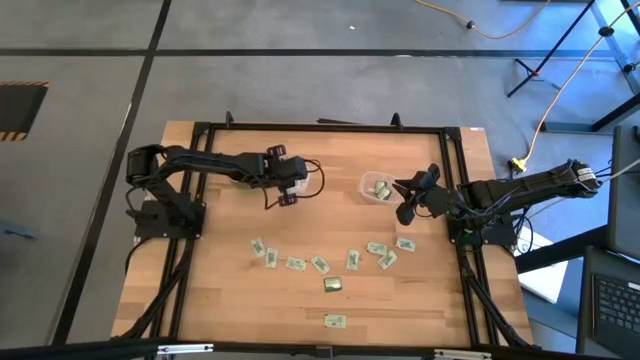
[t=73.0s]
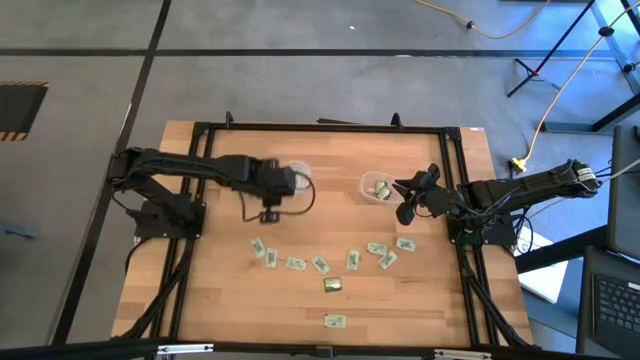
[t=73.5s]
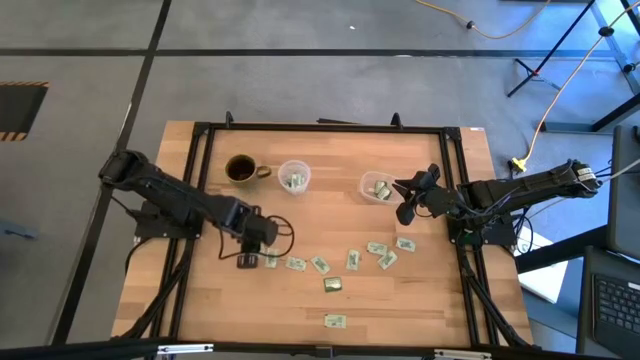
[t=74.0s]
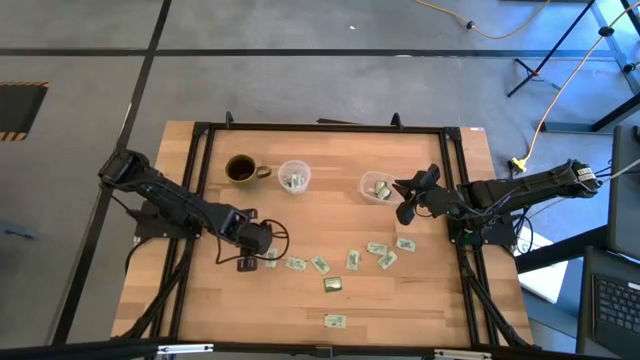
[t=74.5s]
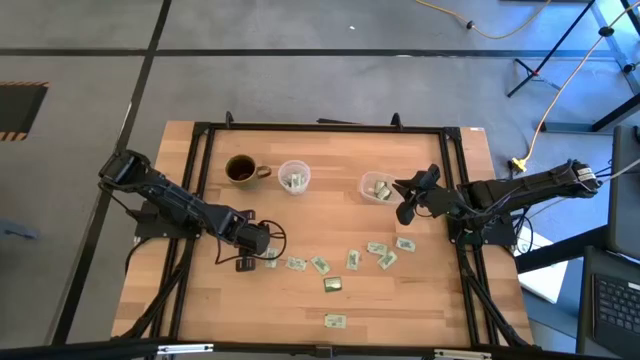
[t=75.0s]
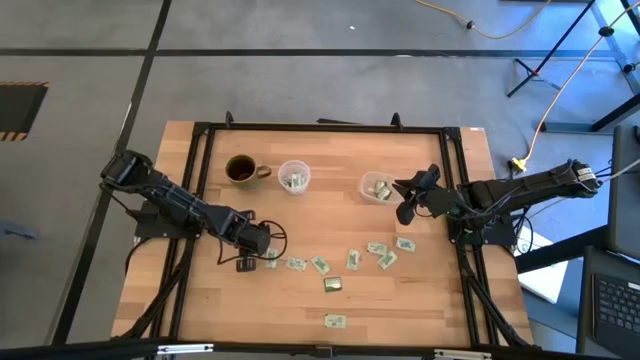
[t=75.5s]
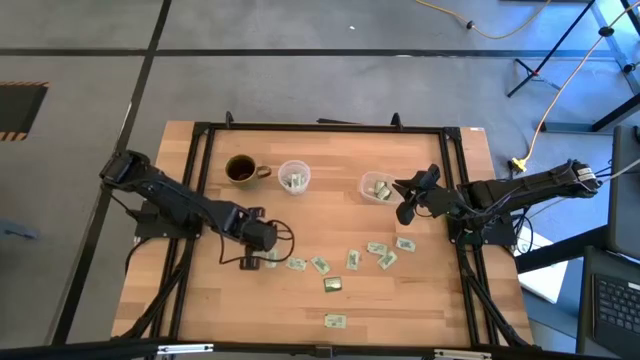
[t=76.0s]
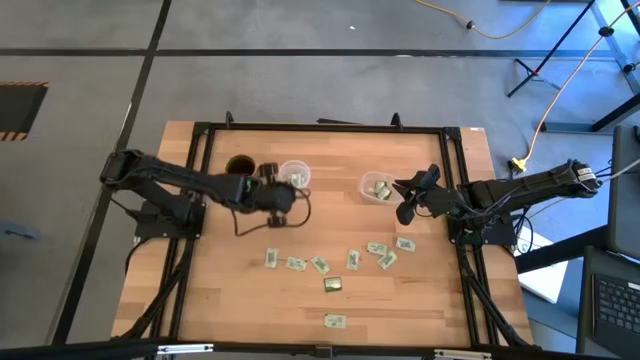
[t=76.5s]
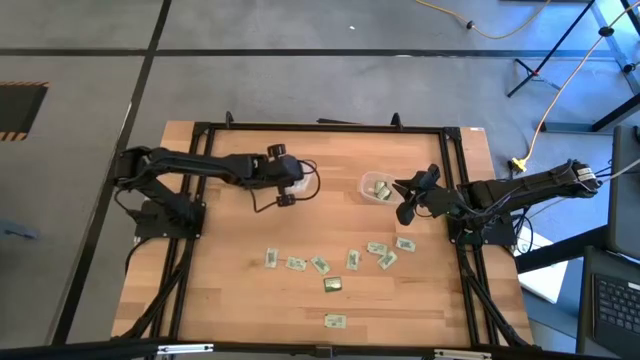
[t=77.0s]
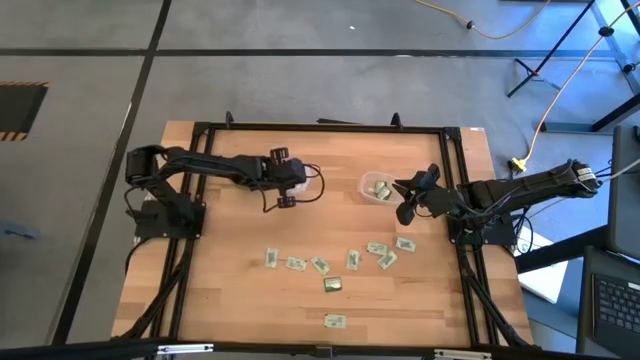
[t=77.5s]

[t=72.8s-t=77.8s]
Task: Pick and place items into bin
Put the white stevia packet into the left transparent bin

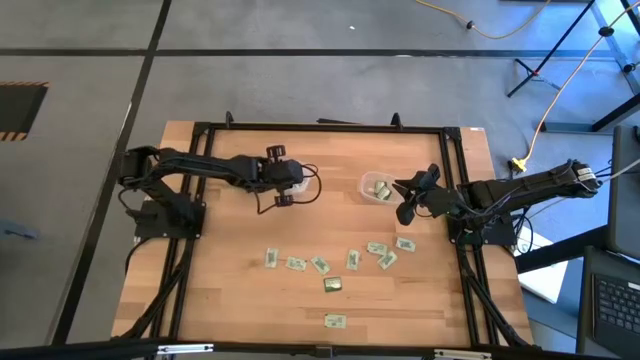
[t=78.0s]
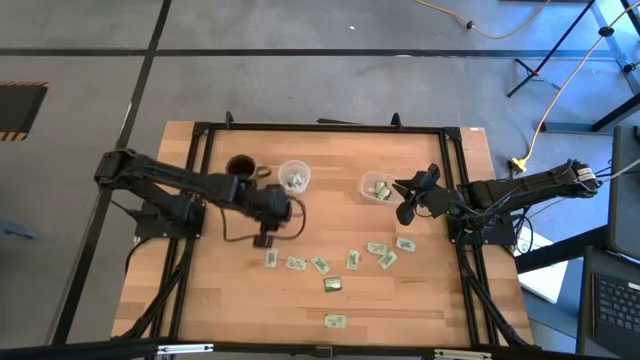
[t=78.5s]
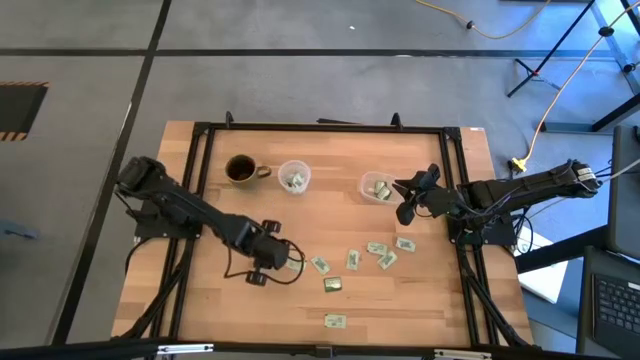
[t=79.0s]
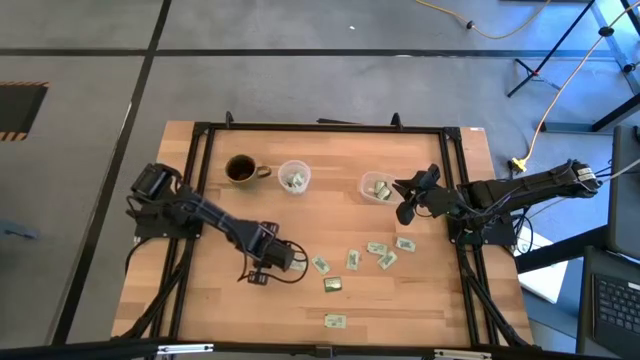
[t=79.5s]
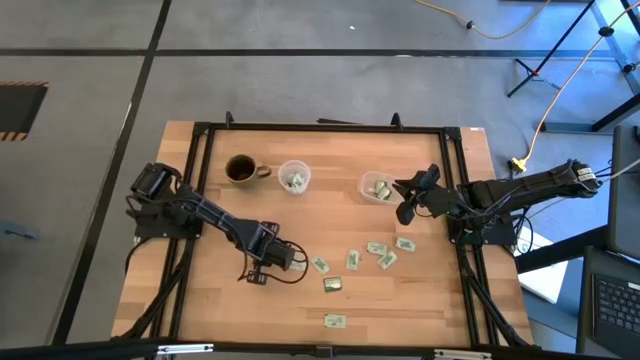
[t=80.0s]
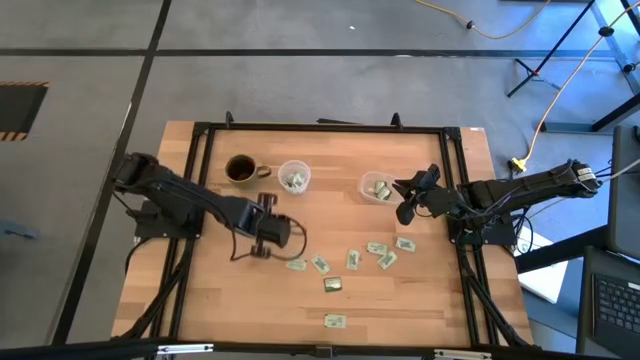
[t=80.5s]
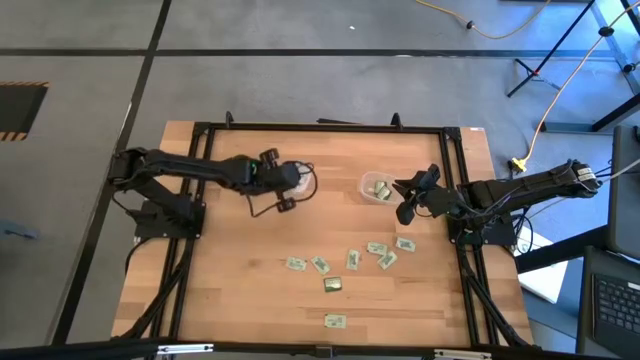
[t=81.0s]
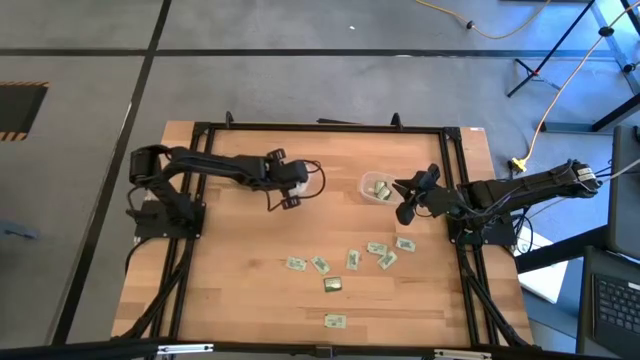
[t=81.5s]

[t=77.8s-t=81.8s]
Put the white stevia packet into the left transparent bin

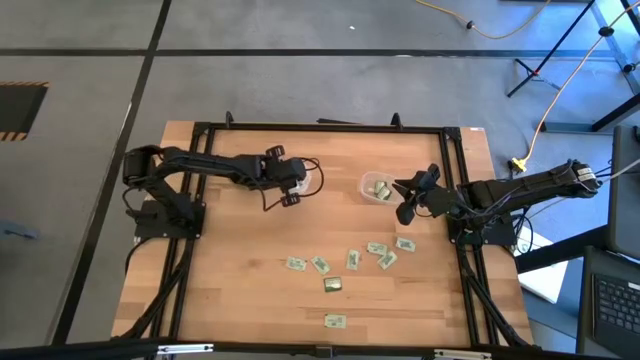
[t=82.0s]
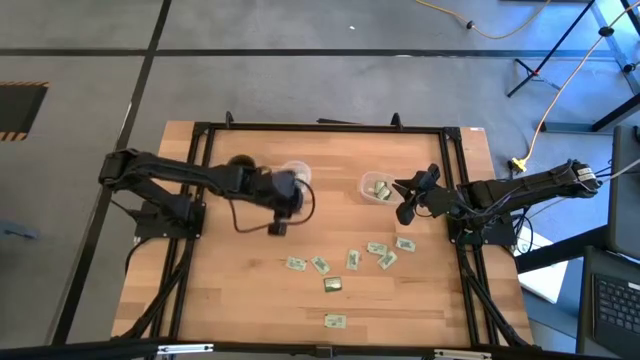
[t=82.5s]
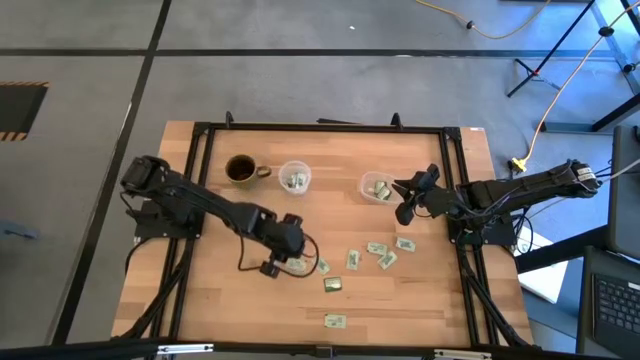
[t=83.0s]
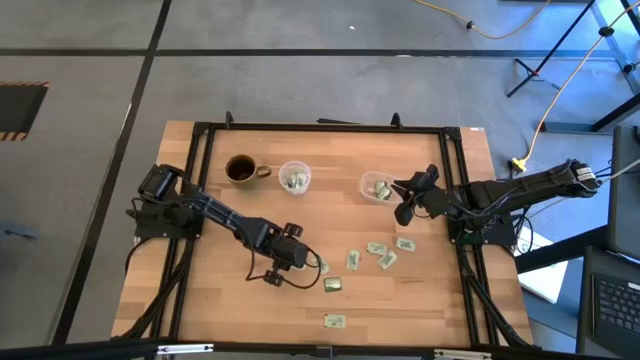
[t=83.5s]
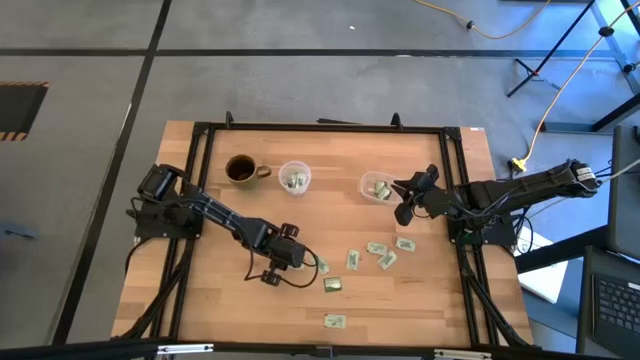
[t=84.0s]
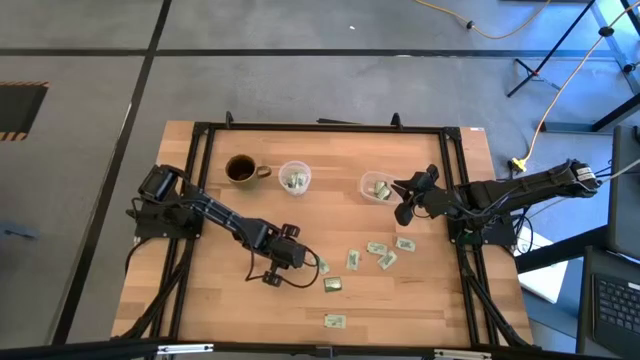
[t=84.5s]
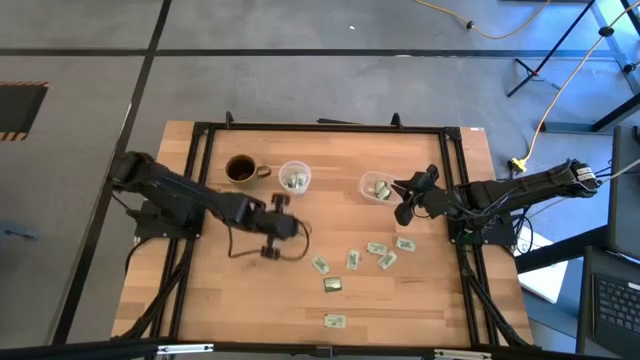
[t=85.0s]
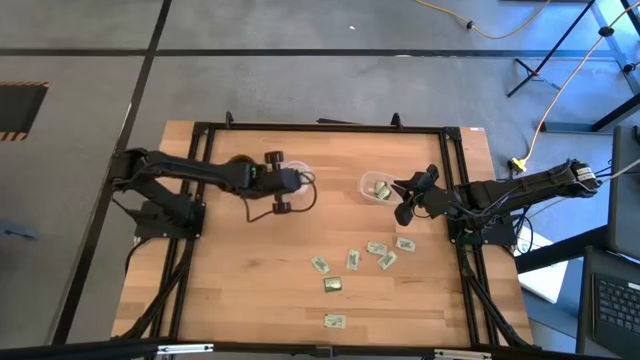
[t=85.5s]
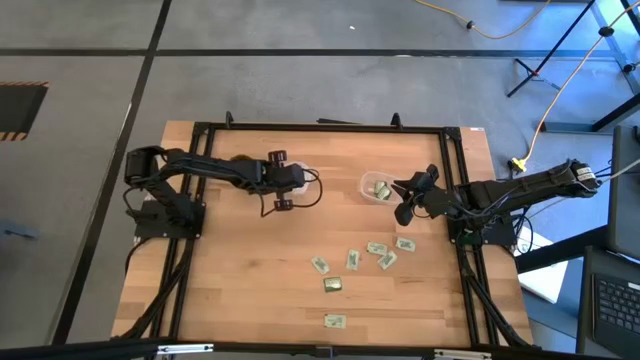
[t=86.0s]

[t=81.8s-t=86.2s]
Put the white stevia packet into the left transparent bin

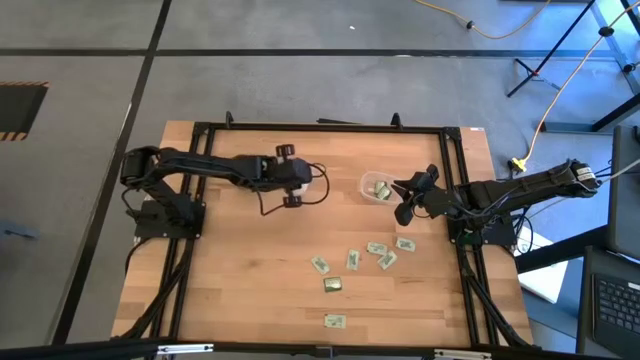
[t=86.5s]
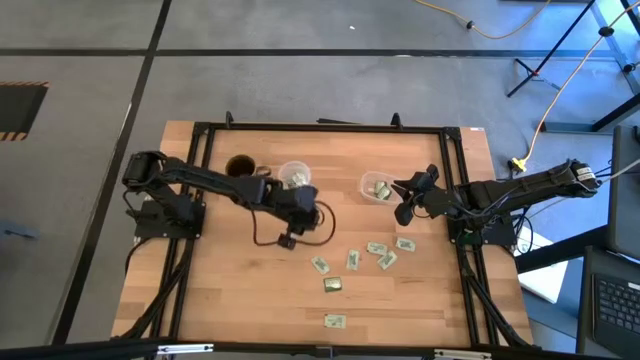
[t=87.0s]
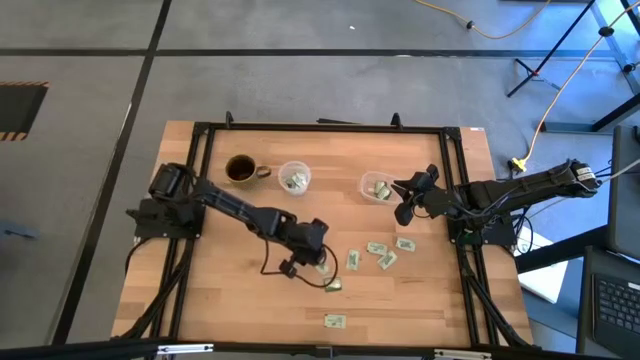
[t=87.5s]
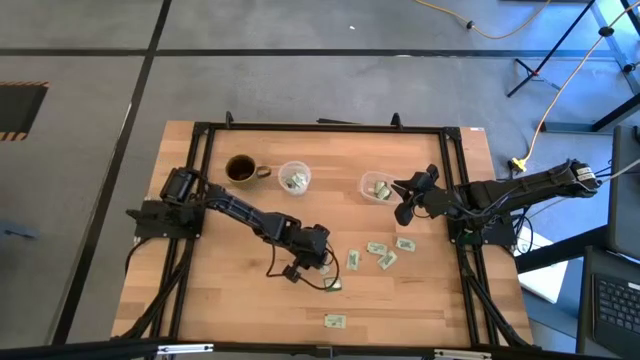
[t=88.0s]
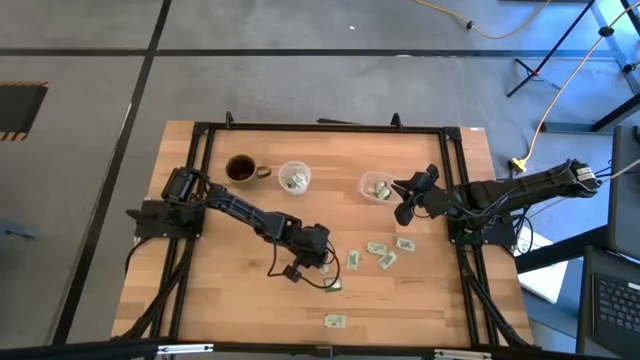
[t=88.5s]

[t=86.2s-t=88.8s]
Put the white stevia packet into the left transparent bin

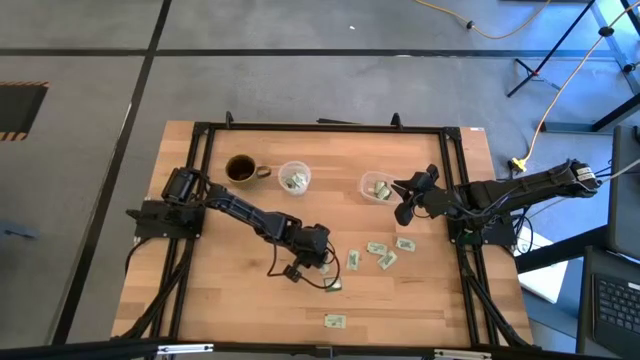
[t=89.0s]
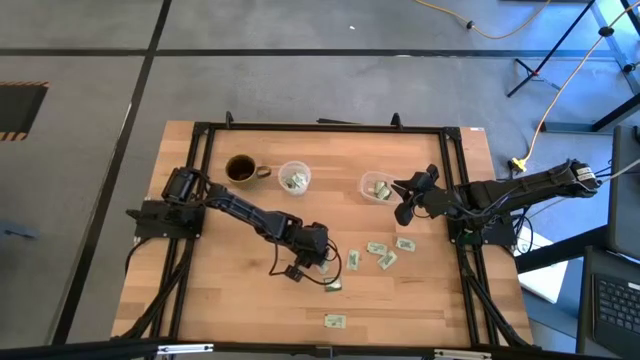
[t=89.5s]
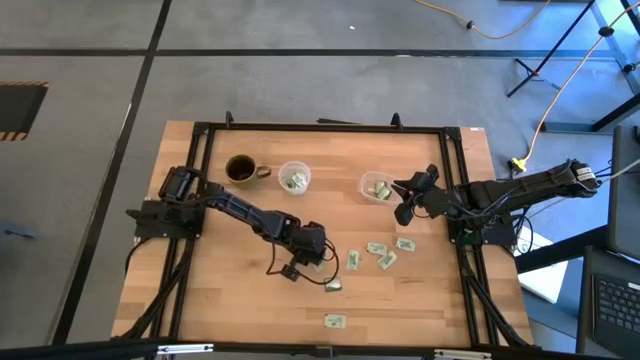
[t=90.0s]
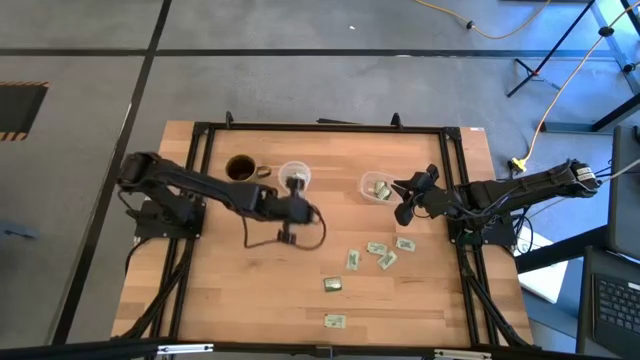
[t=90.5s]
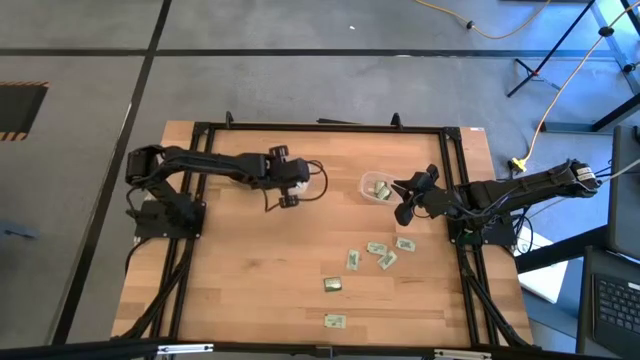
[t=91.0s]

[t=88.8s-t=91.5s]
Put the white stevia packet into the left transparent bin

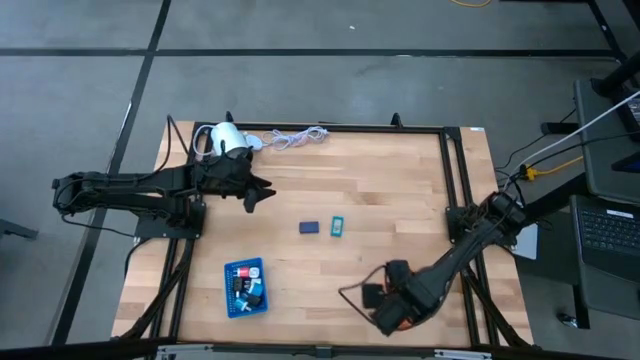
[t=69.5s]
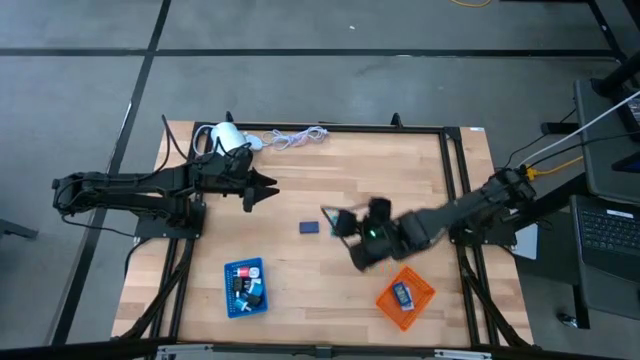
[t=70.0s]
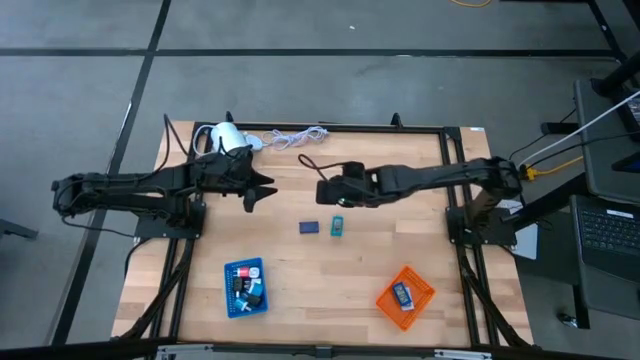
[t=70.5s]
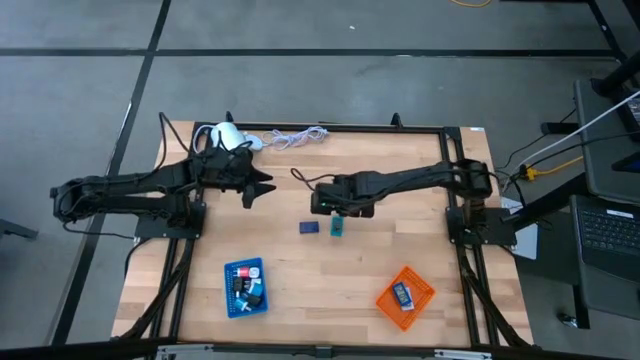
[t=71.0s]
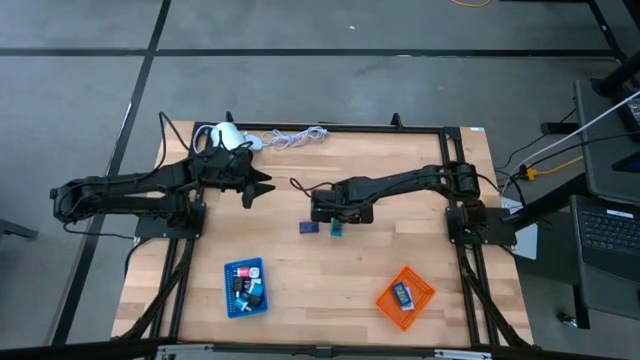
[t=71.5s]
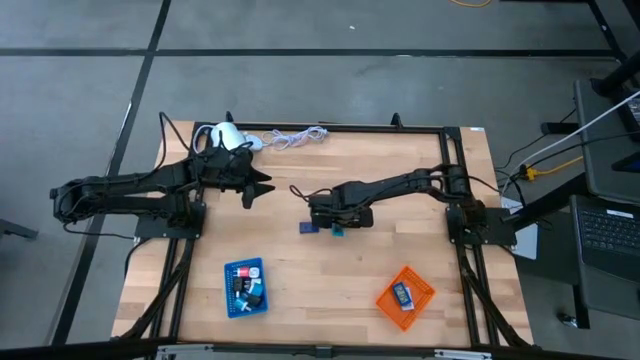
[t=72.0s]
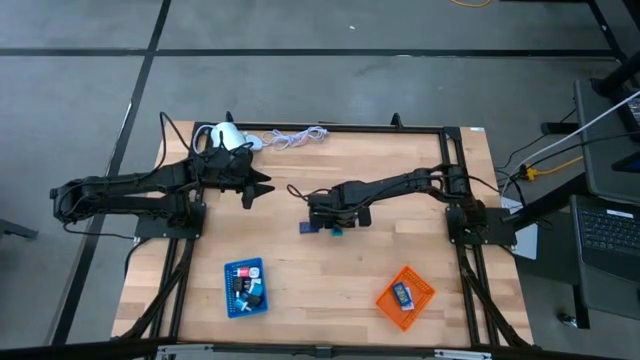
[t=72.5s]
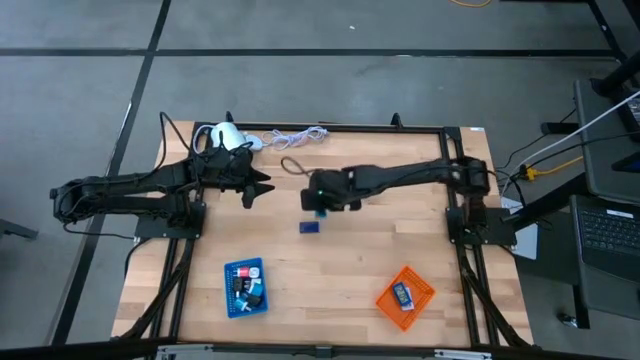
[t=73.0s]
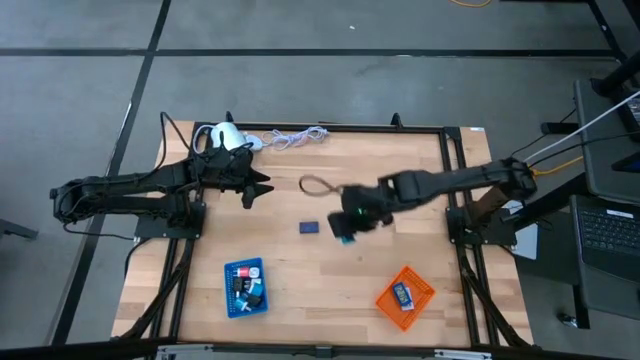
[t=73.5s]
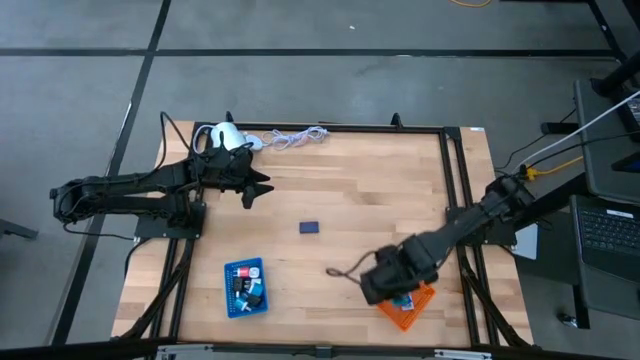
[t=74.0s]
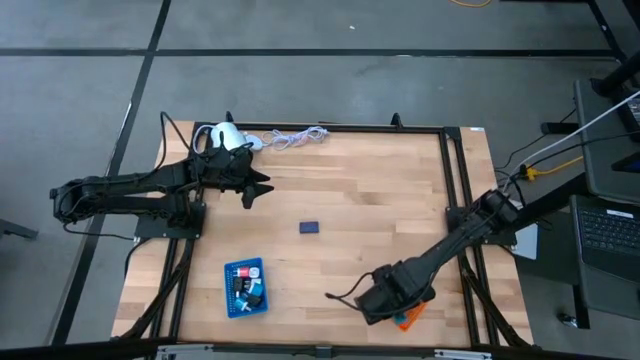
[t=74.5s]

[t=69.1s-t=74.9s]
Task: Pick & Place Office items
Put the light blue digital clock into the orange basket
